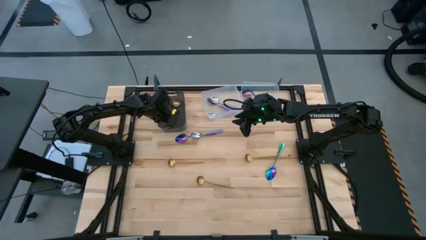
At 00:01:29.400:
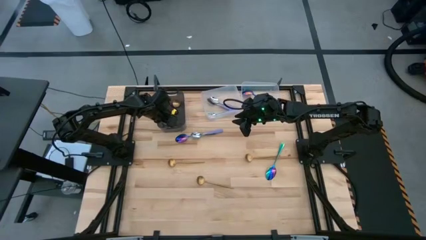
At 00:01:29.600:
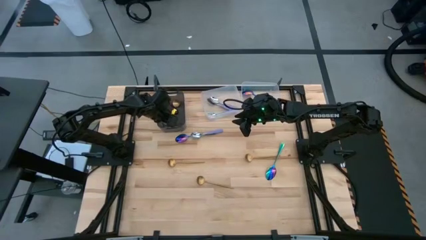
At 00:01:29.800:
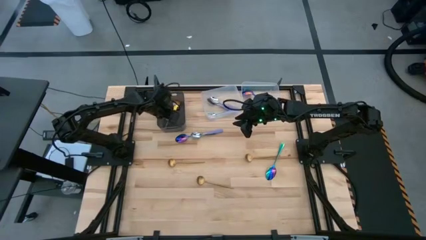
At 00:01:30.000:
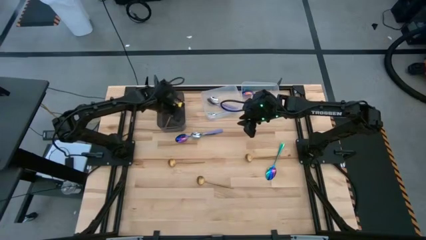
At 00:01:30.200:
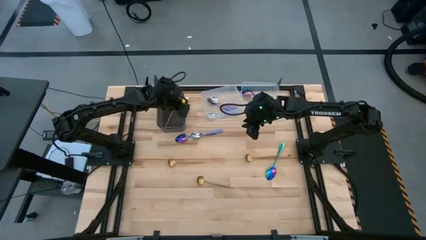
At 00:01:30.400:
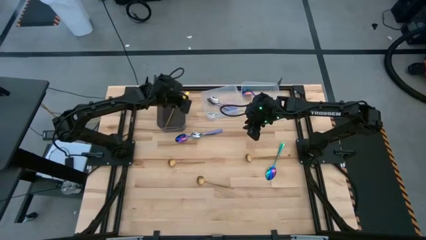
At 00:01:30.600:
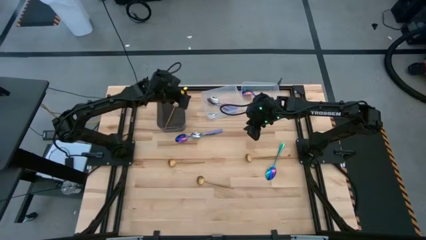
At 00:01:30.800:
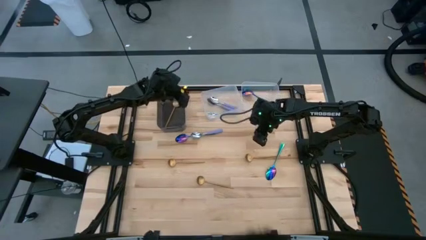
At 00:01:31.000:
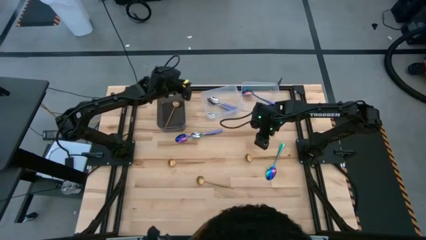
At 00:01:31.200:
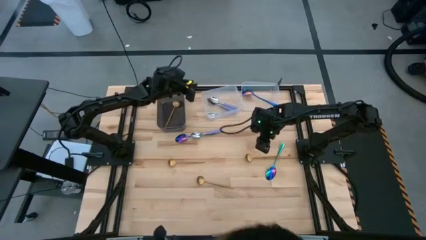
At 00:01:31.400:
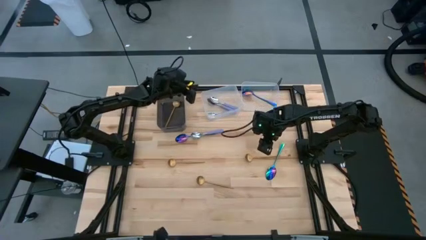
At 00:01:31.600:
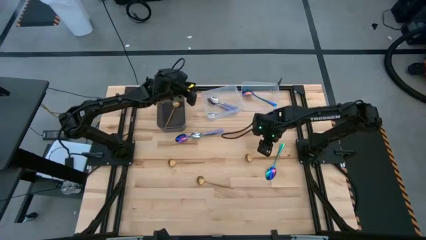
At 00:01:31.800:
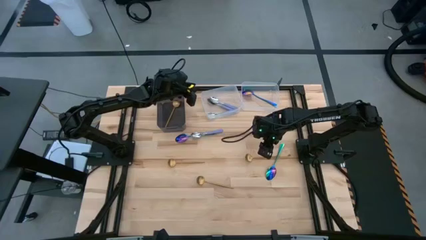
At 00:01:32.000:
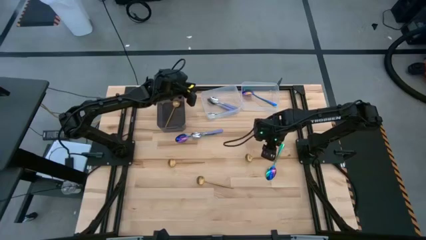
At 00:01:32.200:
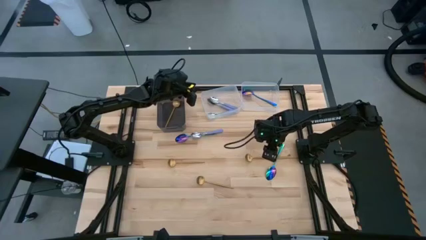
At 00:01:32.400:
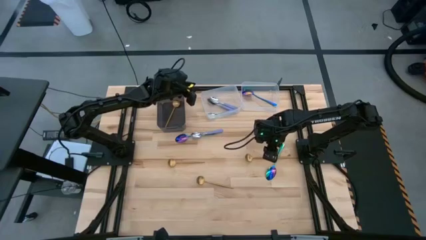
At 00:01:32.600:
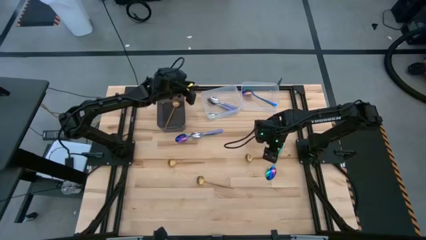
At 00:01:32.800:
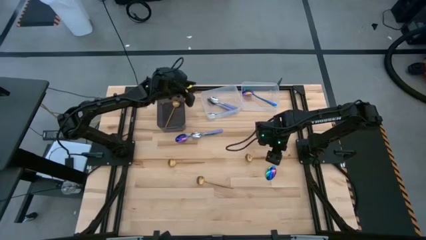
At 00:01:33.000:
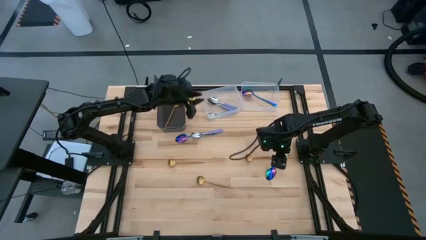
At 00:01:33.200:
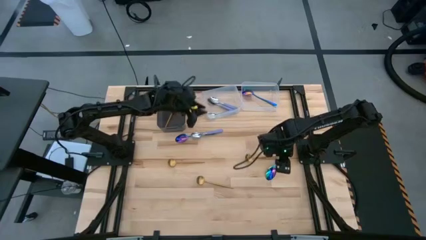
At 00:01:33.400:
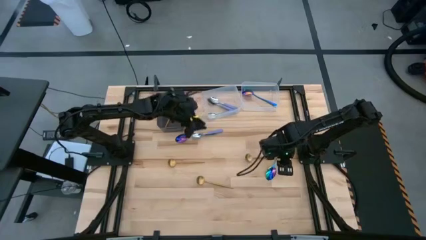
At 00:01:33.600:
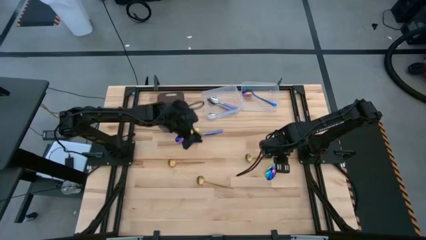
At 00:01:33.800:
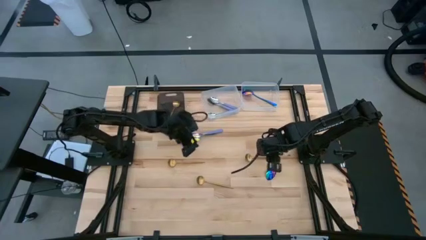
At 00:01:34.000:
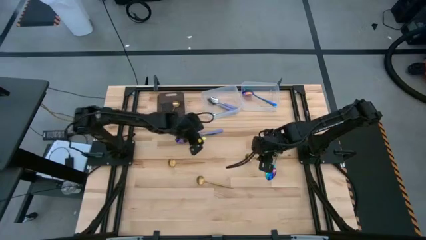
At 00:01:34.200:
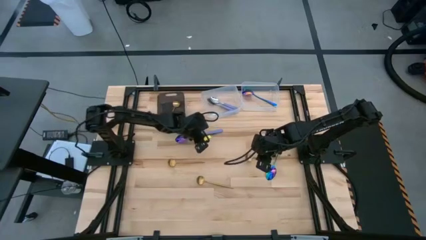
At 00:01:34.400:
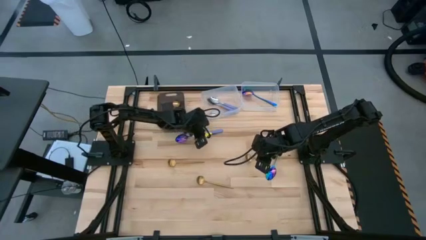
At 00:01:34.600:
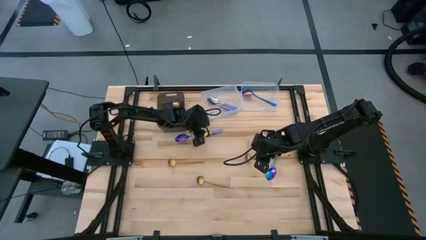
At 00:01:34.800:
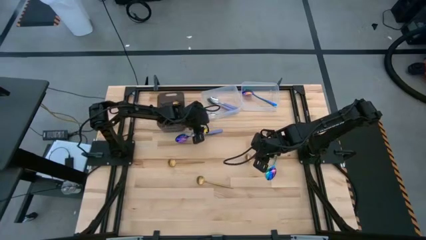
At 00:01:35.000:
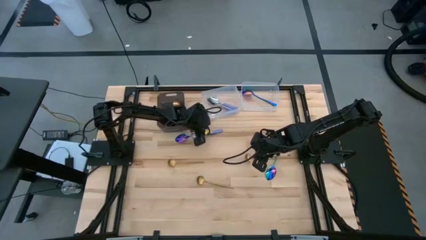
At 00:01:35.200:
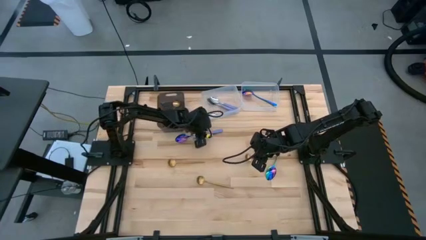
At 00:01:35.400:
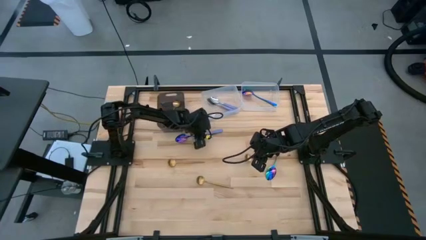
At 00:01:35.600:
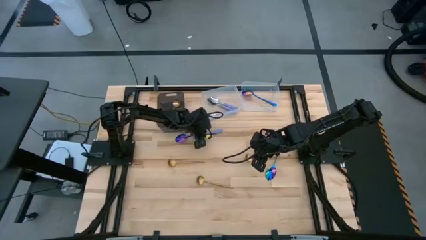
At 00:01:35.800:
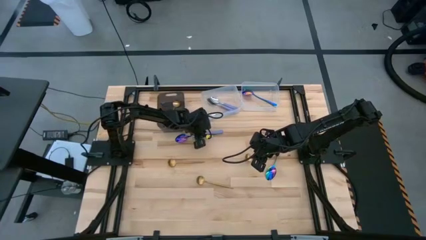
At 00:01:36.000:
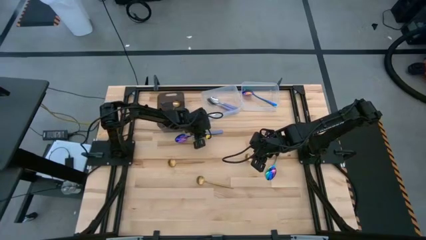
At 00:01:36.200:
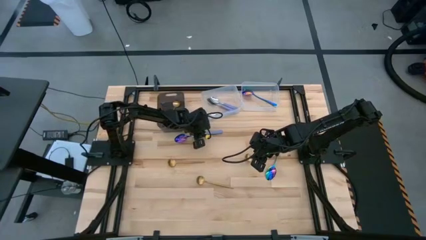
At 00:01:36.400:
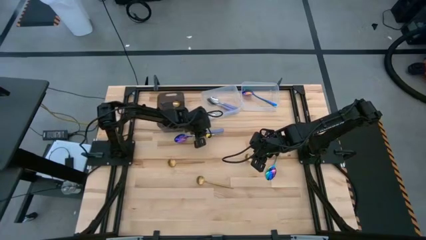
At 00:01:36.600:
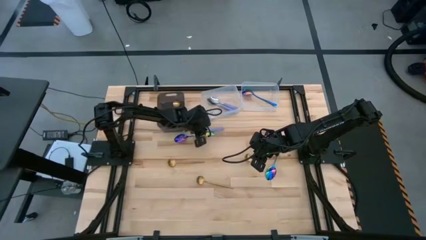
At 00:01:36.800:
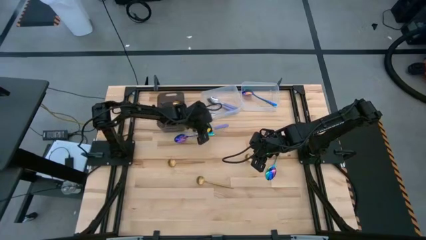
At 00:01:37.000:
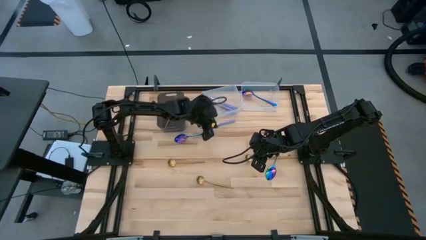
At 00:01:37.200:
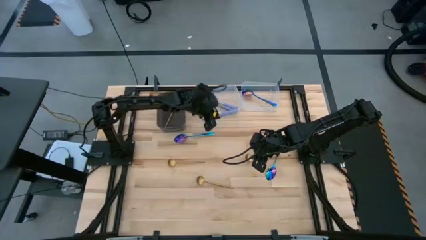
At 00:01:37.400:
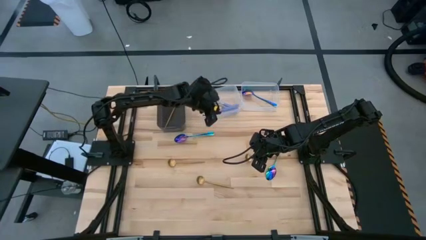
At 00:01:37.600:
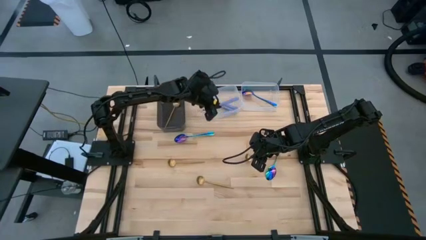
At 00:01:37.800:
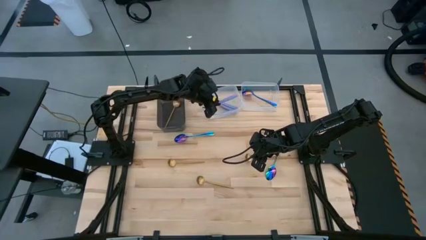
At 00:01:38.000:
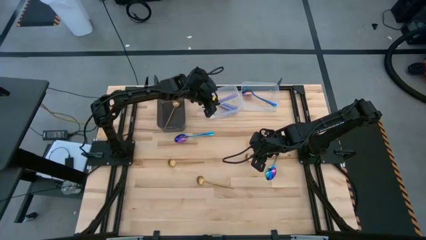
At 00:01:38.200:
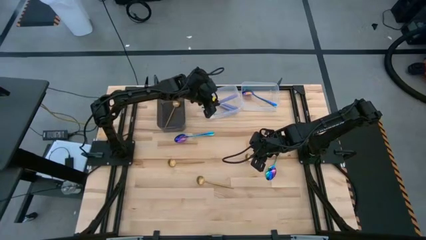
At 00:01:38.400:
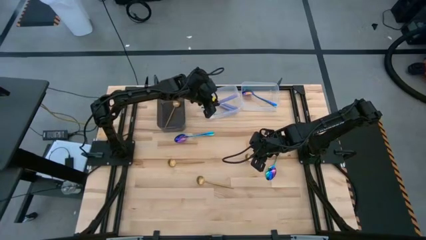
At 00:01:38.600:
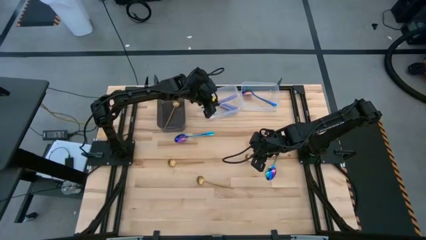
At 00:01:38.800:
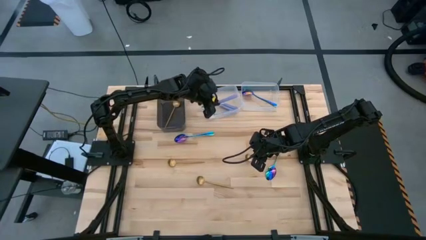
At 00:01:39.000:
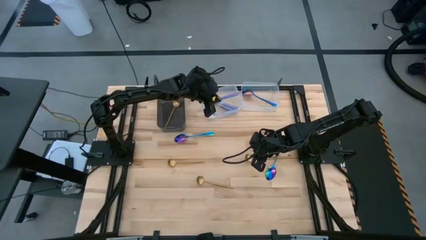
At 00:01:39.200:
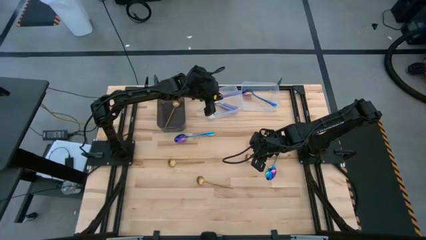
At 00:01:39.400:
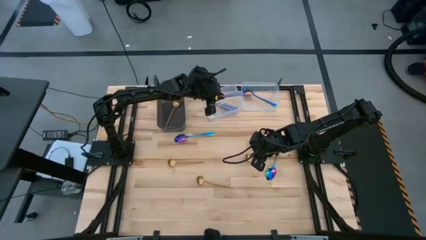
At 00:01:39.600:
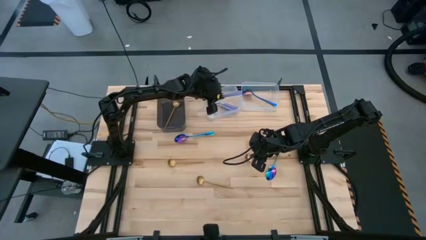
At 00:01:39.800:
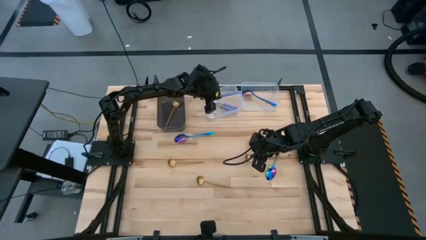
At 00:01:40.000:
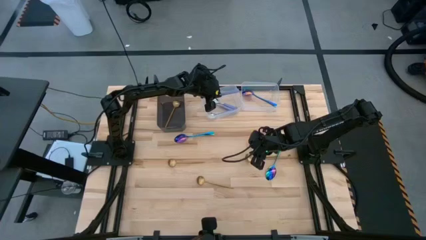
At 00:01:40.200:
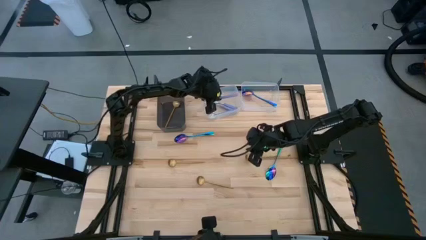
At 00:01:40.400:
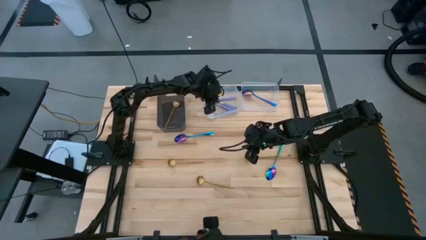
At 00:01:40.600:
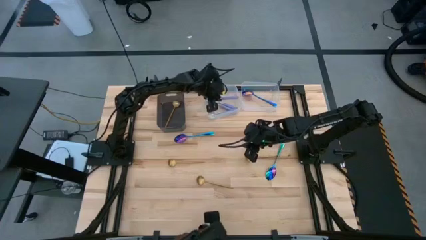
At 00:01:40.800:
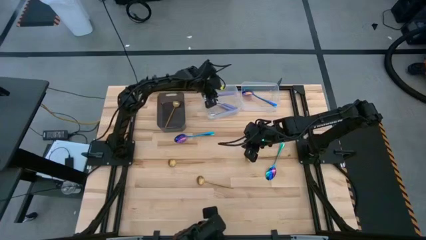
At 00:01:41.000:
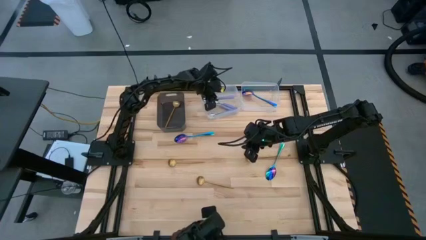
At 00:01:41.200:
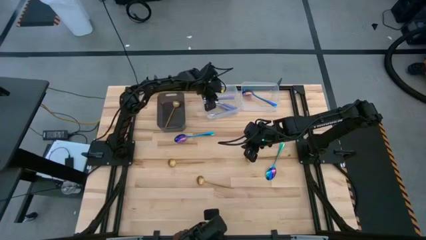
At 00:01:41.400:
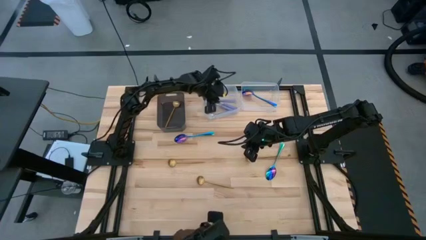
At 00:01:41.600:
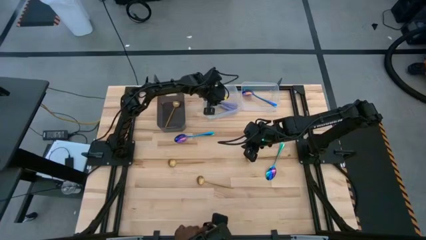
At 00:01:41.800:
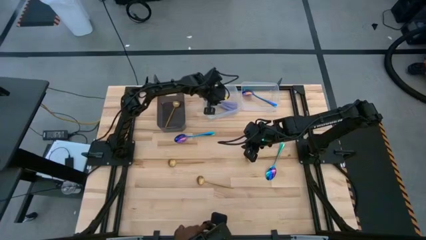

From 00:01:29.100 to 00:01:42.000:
Task: Sort silverware by color (type)
Put the purple spoon into the left transparent bin
